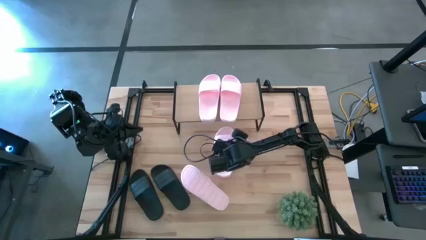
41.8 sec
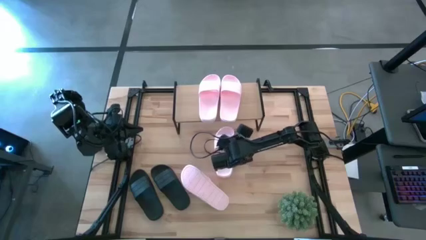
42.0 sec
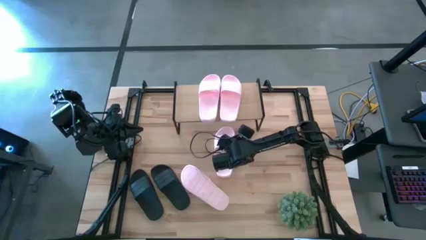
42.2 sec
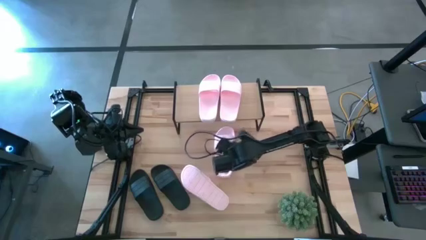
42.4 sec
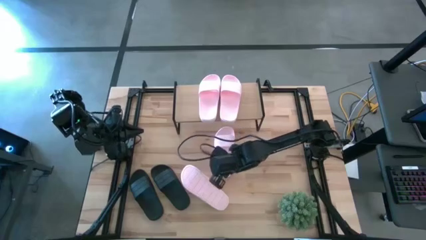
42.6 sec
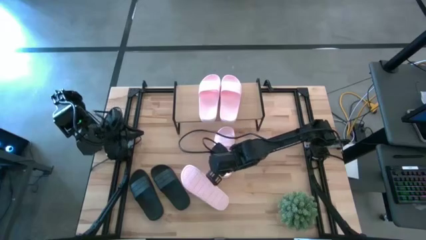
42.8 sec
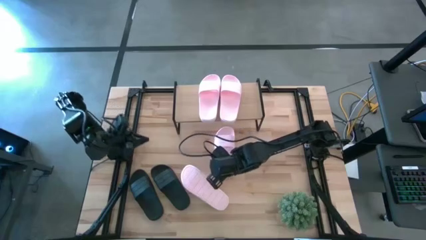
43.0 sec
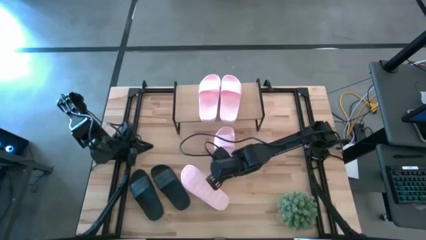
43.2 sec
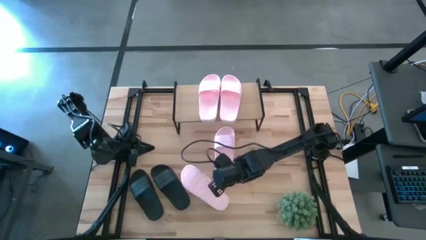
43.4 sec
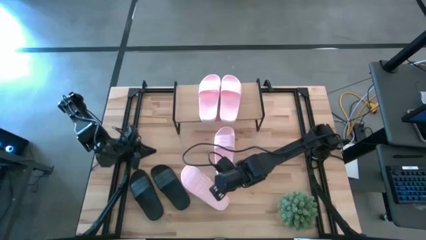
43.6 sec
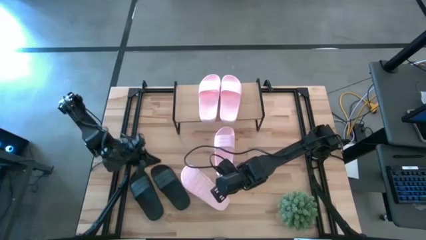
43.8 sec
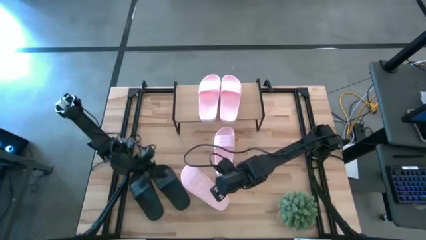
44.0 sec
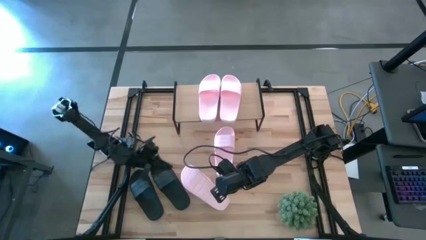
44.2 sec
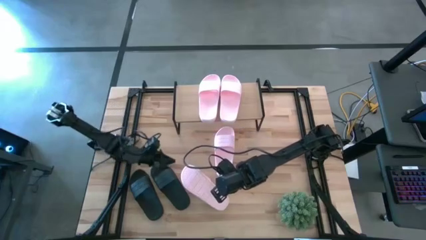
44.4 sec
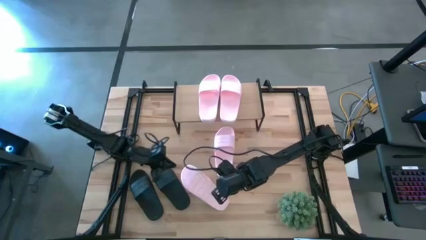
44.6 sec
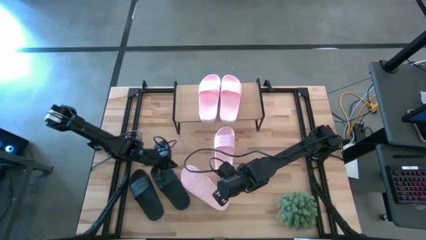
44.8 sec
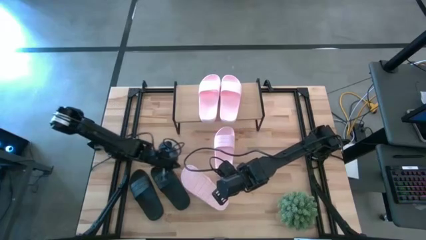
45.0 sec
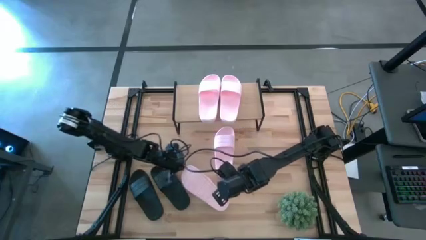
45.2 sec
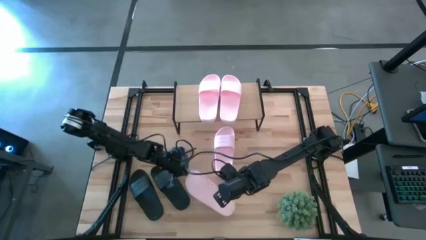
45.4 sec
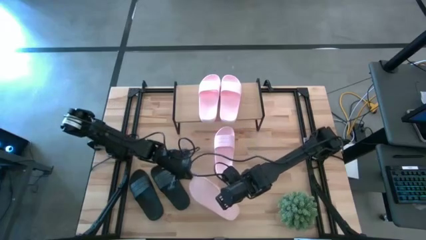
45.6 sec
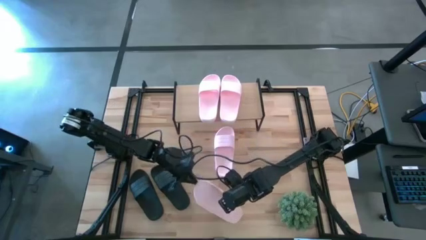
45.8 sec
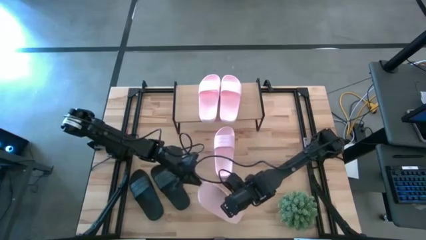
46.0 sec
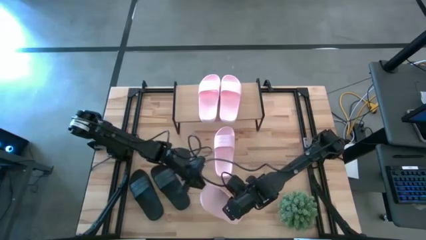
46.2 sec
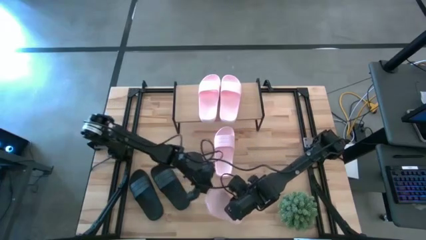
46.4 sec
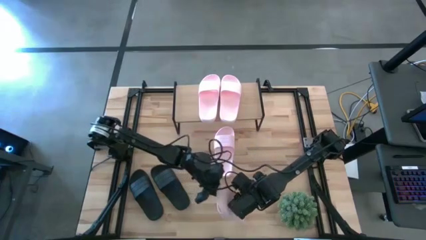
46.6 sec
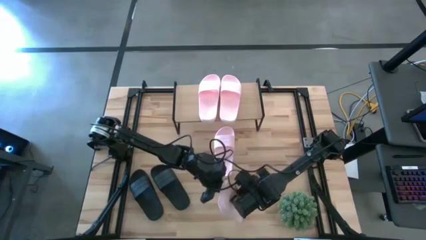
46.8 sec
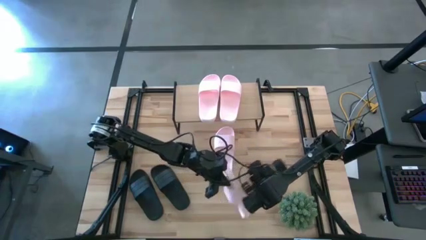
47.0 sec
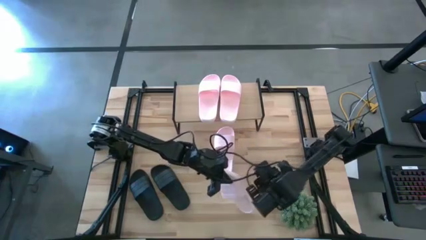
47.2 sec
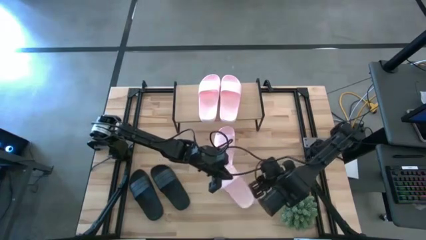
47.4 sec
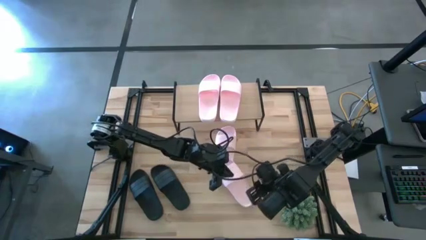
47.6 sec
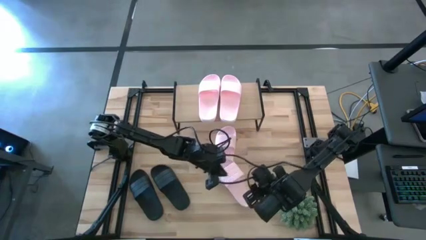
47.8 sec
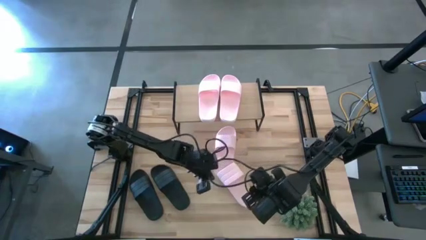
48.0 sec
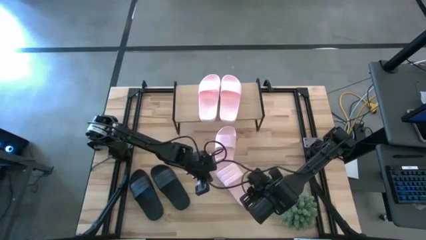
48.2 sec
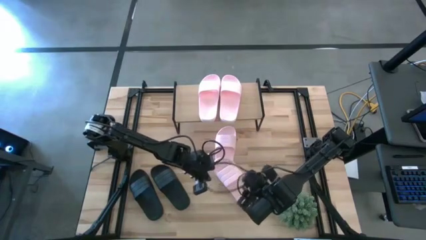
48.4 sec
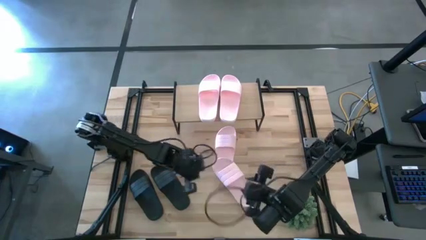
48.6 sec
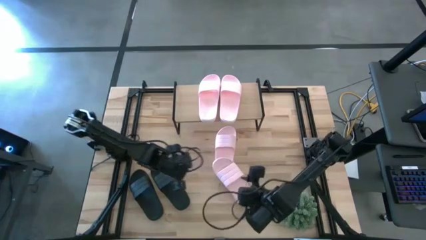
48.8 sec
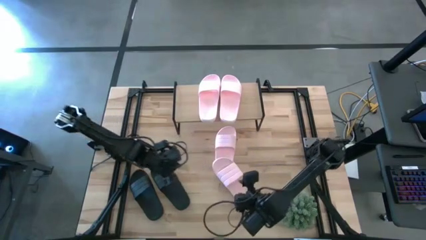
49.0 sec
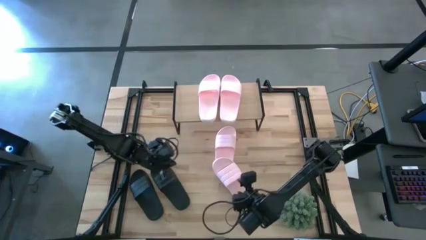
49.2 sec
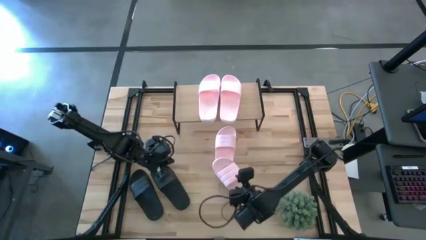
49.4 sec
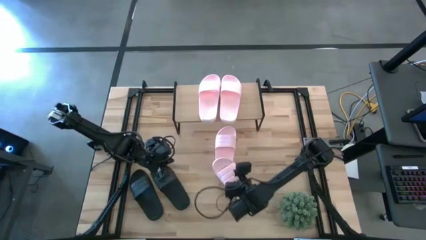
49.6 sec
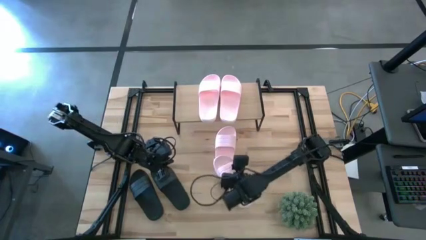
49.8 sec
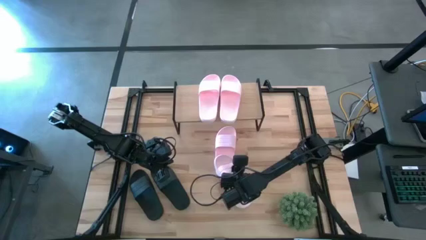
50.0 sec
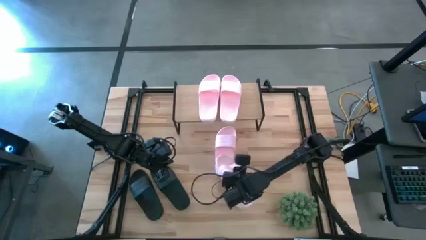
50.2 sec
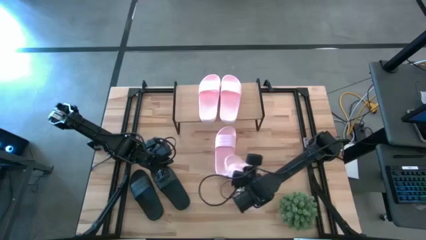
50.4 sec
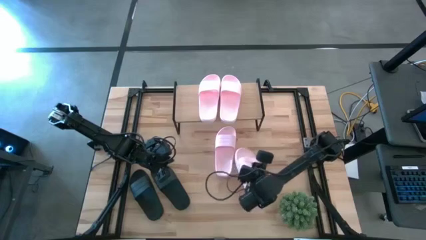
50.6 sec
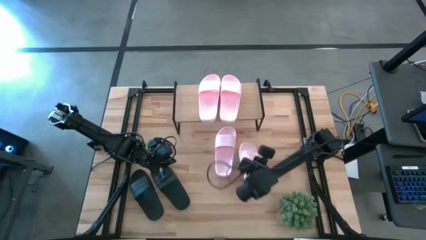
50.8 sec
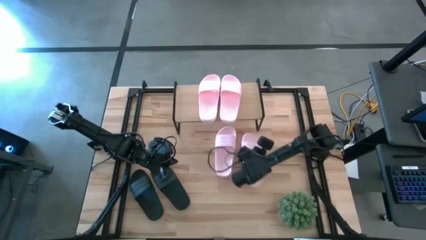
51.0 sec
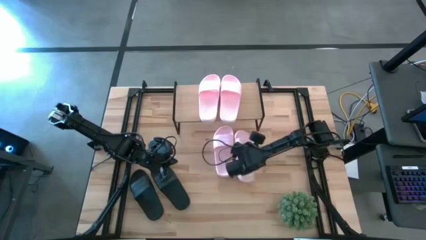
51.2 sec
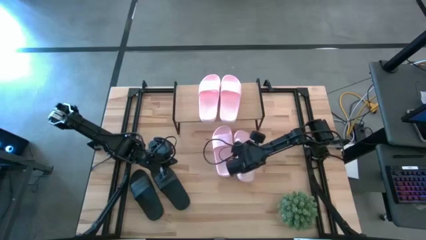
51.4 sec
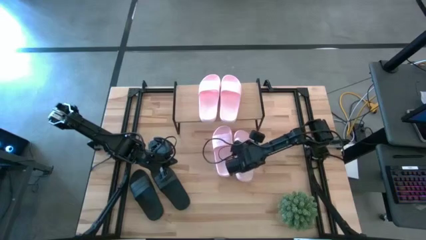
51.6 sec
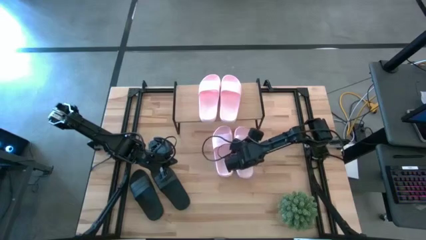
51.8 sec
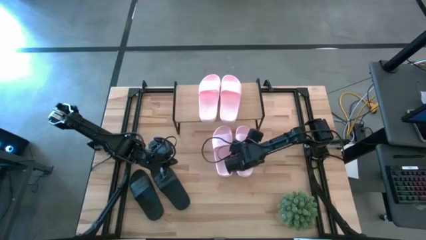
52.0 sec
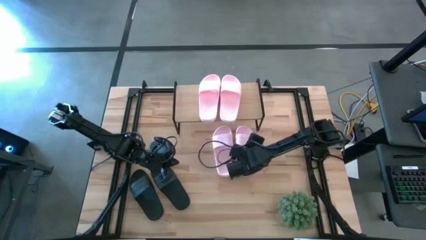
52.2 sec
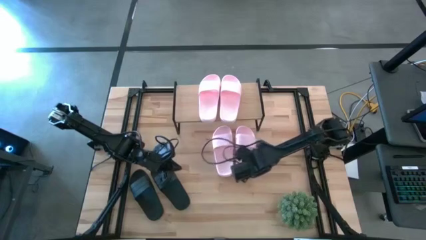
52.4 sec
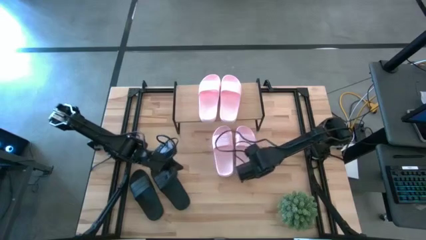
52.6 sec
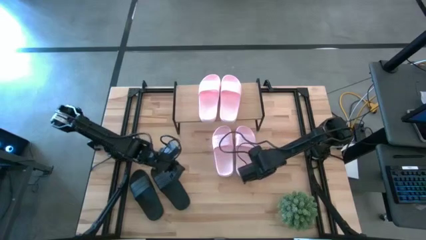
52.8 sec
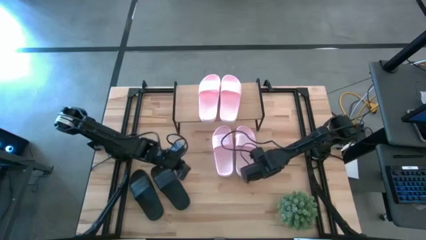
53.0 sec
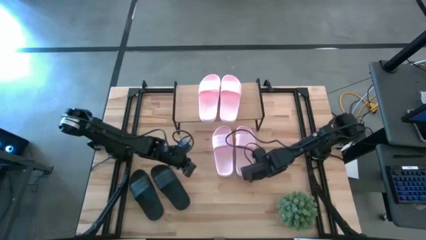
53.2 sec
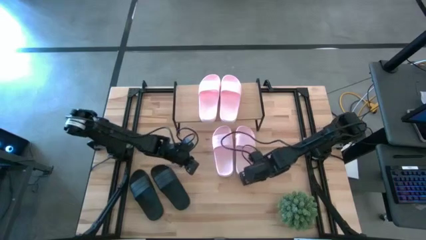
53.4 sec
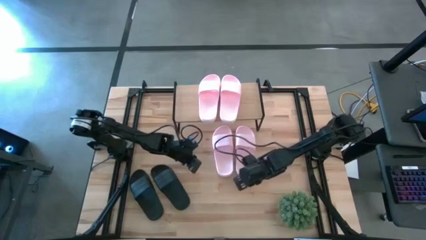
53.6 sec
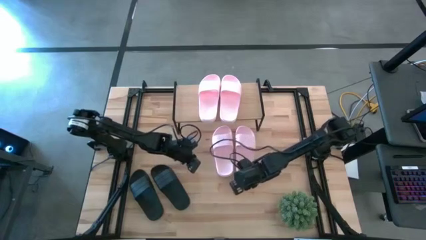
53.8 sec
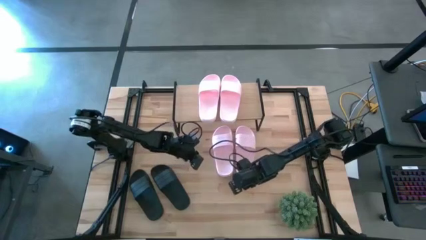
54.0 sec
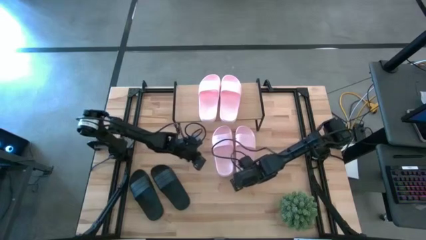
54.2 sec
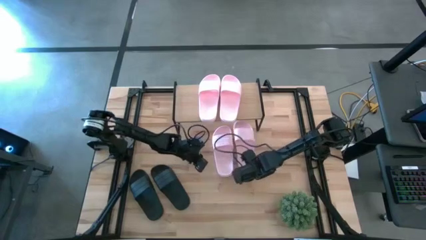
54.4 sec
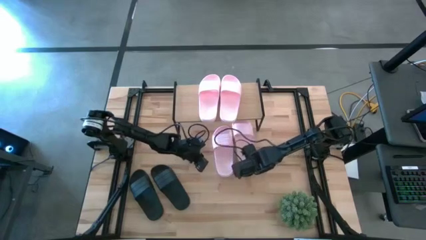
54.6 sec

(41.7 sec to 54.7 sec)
Task: Pick and place slides into the shelf
Put the pink slide under the shelf

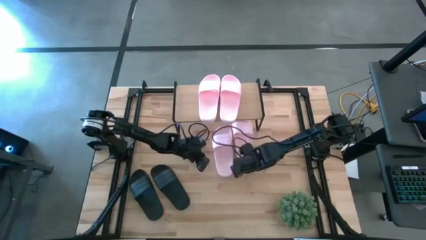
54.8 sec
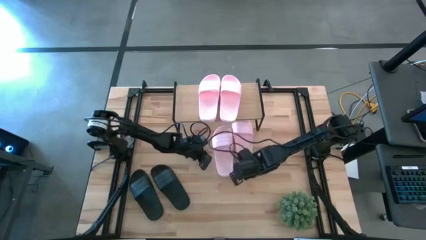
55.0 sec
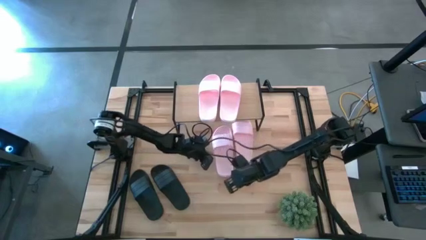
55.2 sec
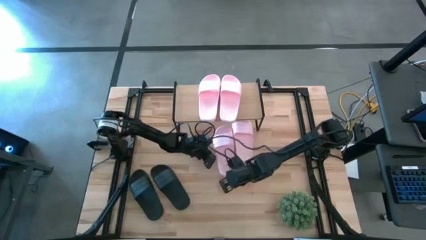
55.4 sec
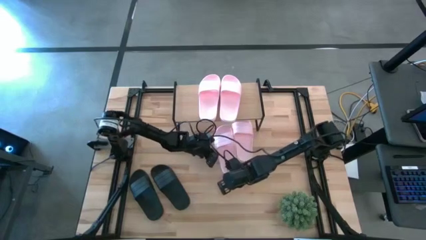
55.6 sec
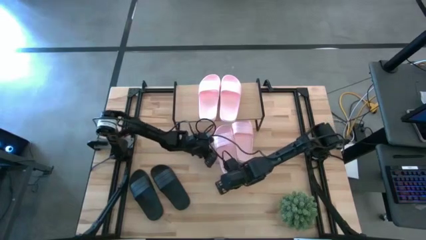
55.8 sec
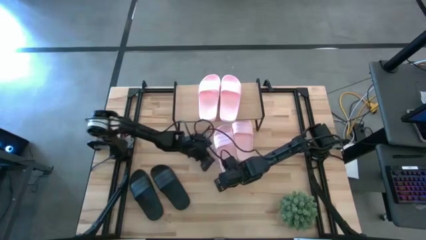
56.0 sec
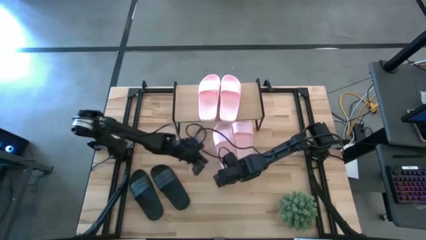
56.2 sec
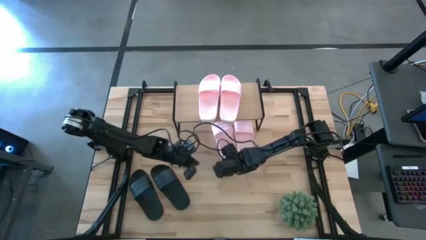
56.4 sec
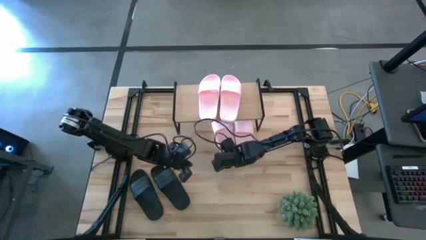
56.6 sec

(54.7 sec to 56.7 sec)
Adjust the pink slide
